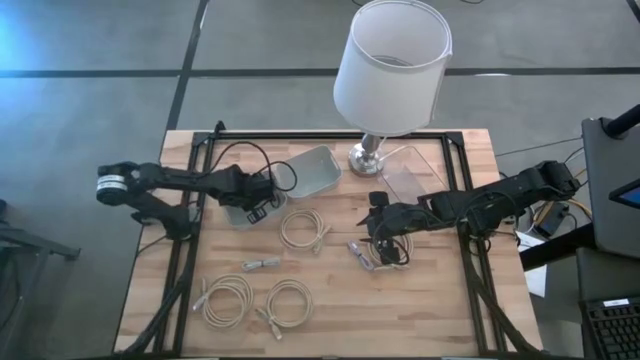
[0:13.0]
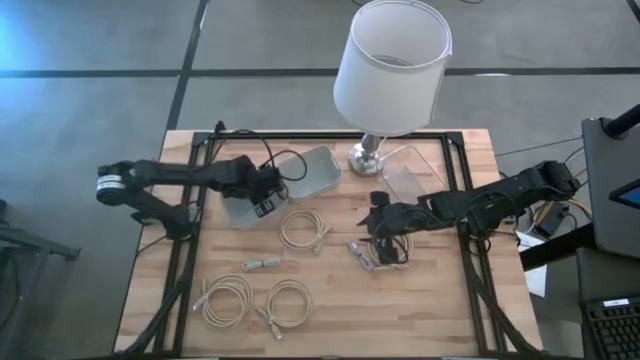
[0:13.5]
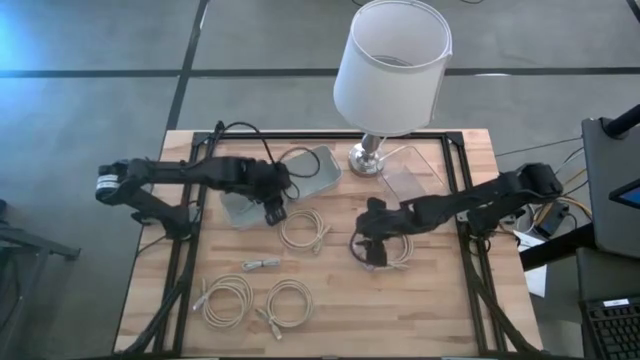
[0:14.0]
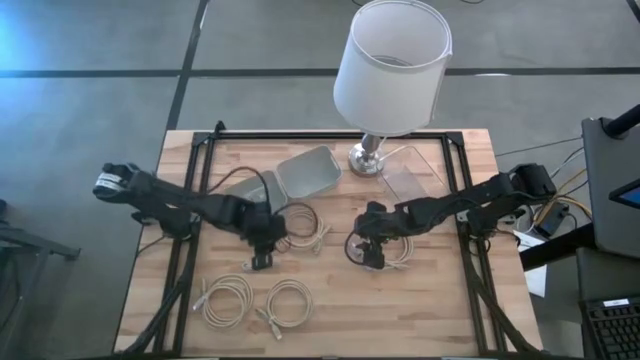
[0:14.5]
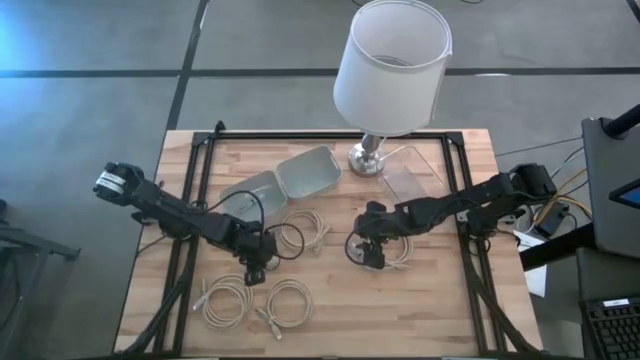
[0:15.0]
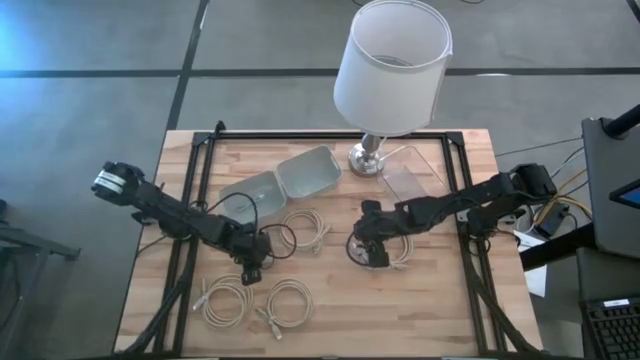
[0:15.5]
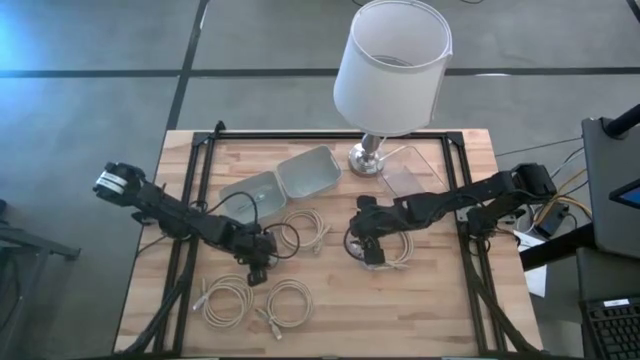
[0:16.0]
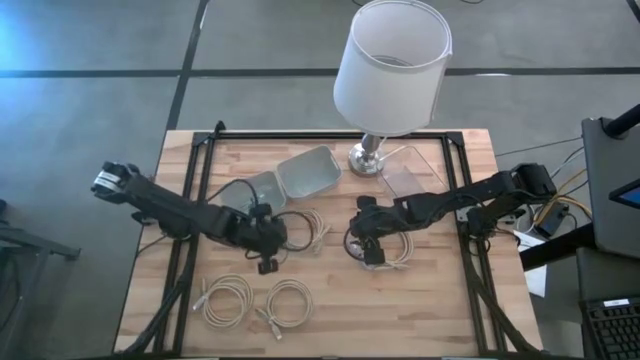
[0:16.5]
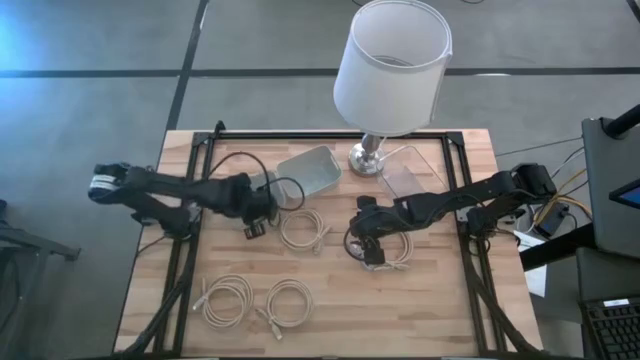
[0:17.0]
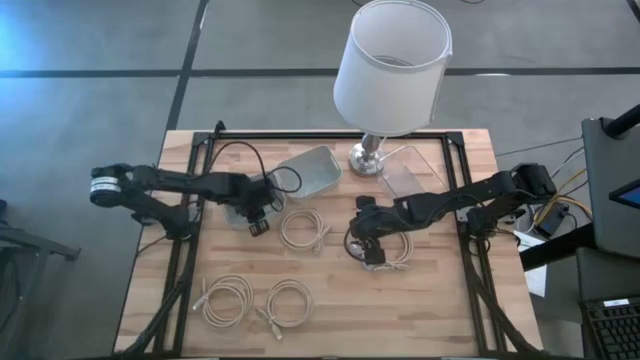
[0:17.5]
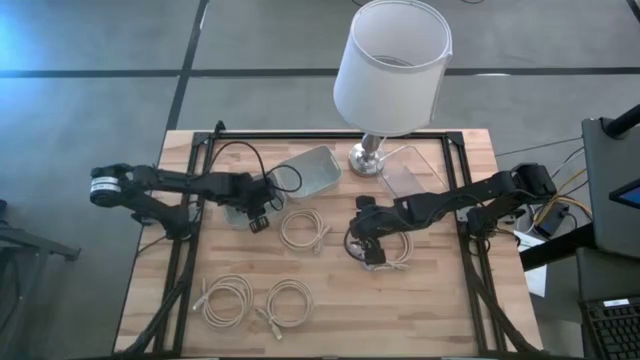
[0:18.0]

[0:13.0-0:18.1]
Task: Pick & Place USB Port
Put the white USB cable into the left white bin

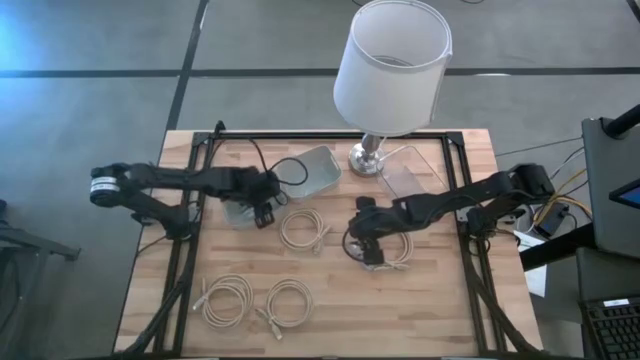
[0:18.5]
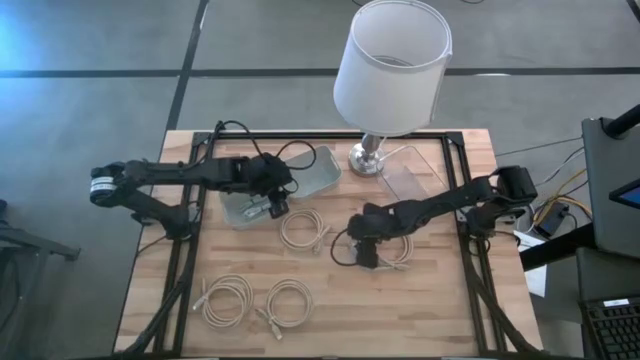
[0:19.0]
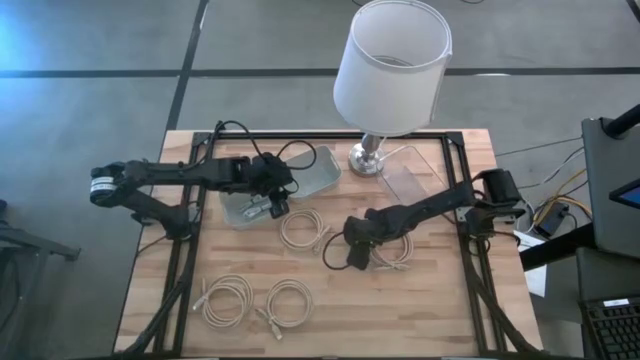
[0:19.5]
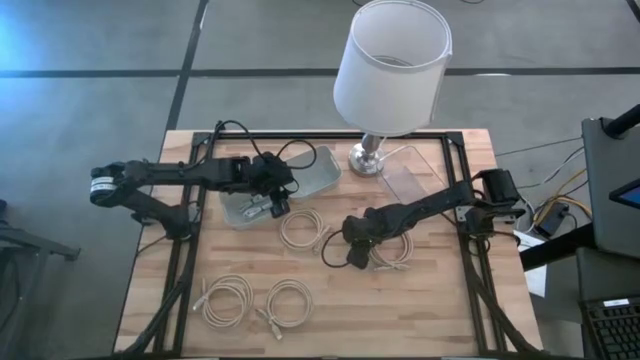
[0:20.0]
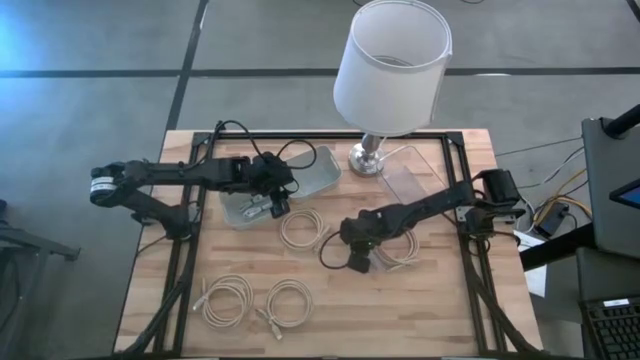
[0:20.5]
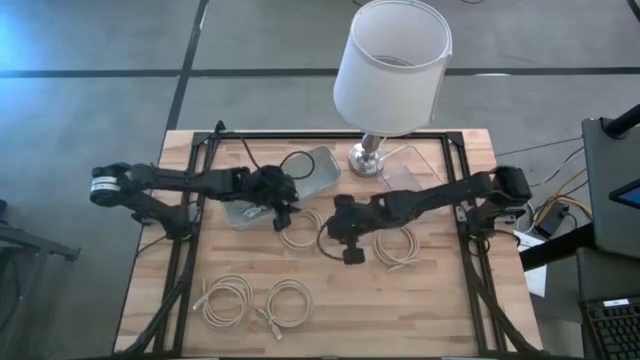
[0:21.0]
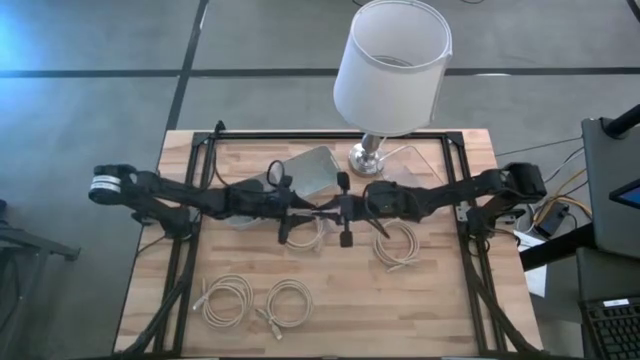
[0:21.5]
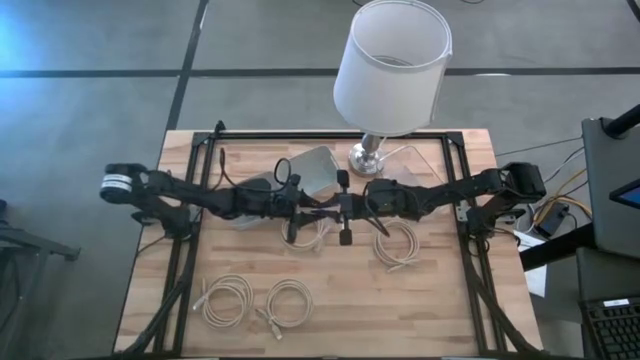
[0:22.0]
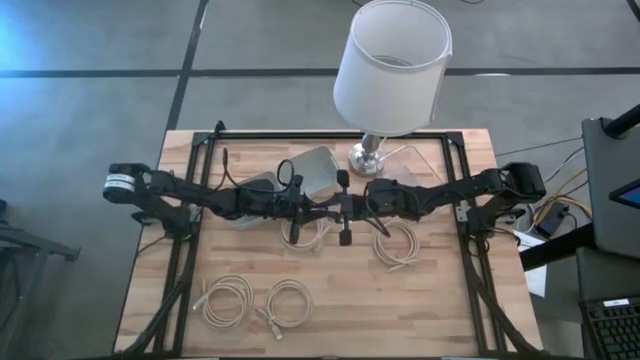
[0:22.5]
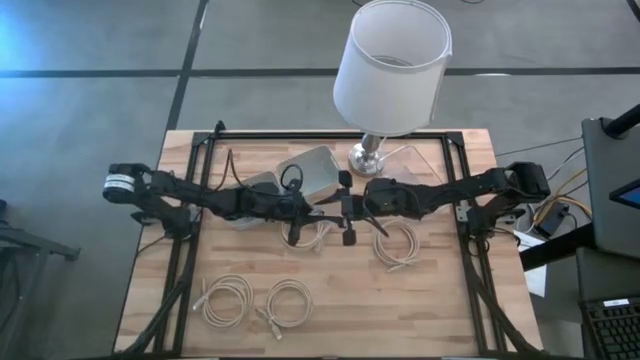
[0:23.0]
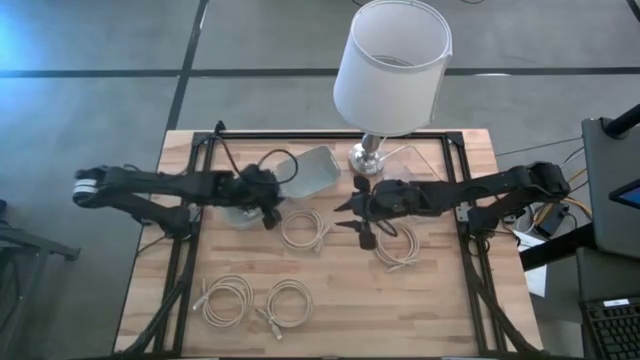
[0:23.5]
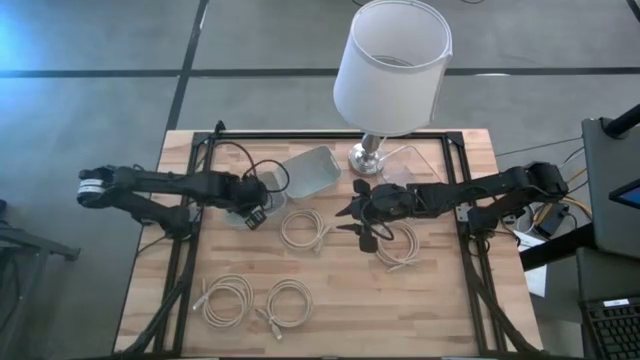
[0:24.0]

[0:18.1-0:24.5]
Put the purple USB cable into the left white bin

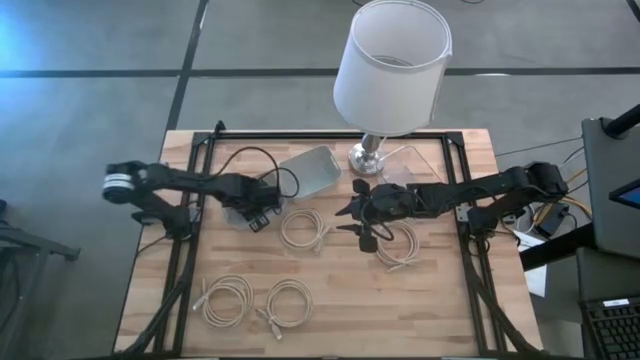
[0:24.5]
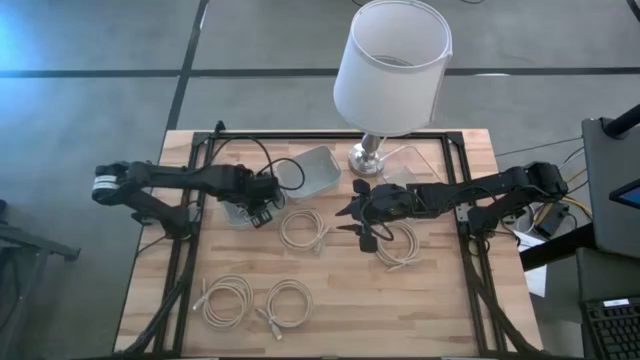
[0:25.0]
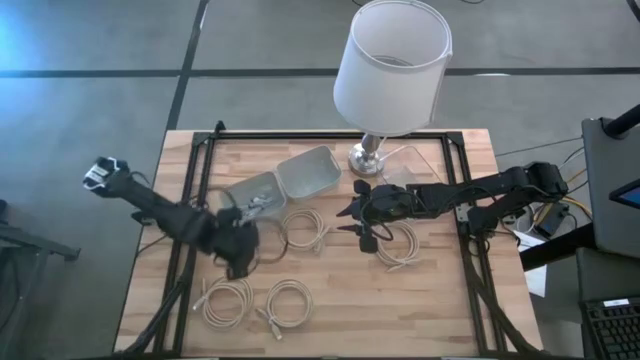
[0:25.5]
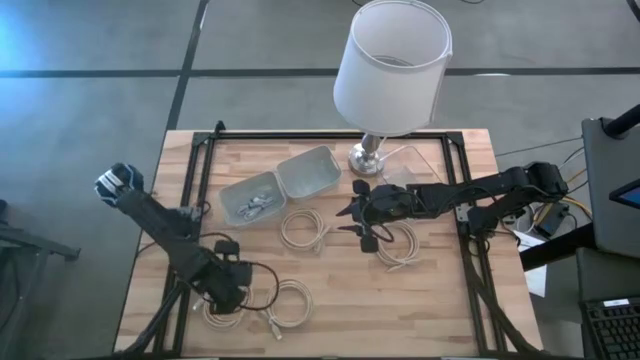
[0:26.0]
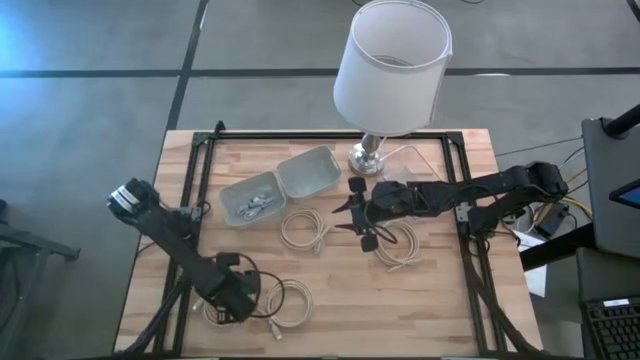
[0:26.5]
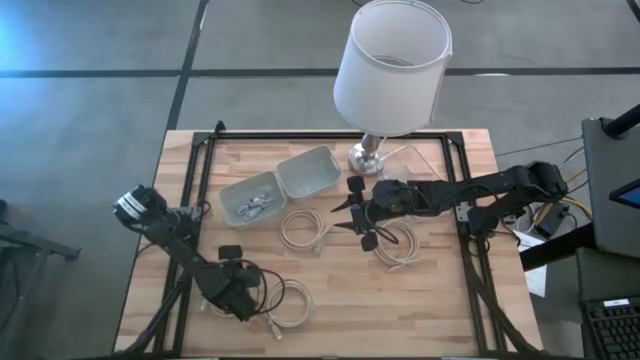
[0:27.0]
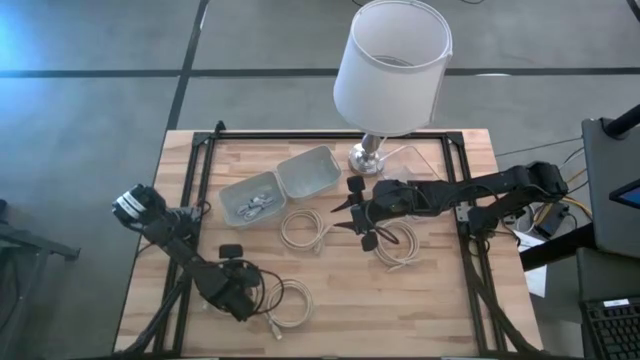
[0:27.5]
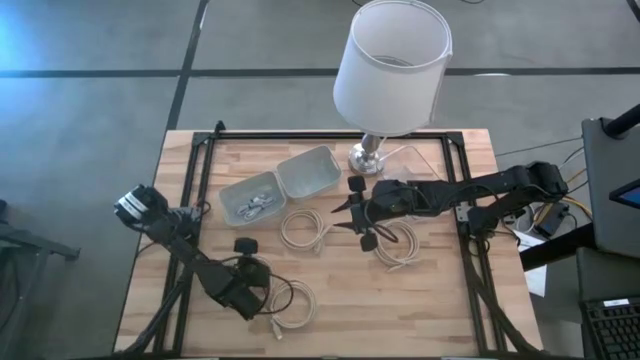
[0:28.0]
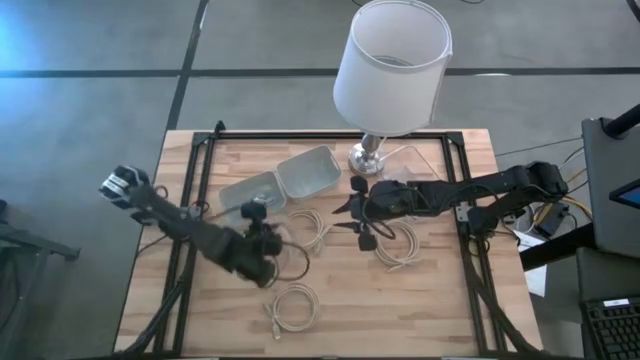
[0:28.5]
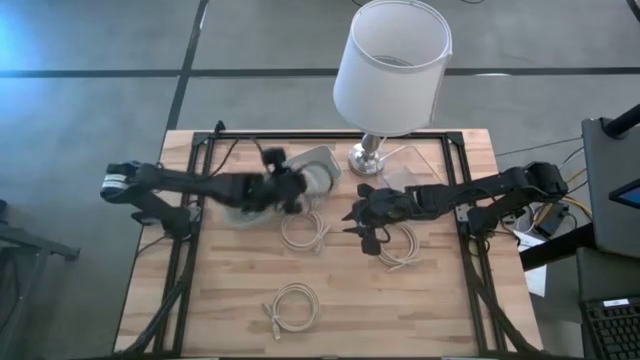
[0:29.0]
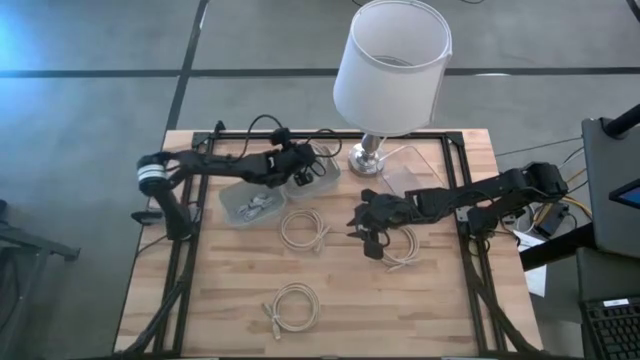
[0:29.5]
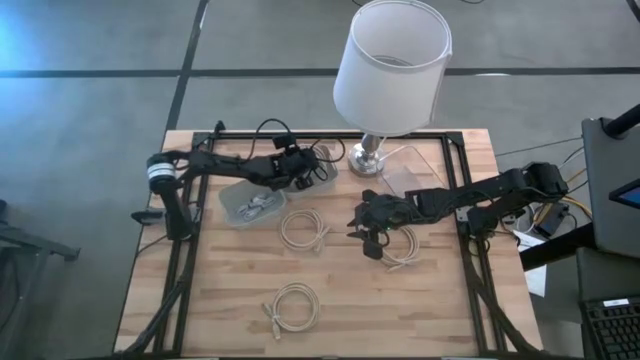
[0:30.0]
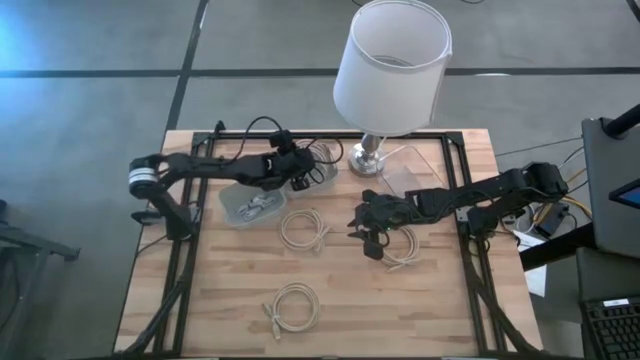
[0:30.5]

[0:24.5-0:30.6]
Put the light brown USB cable into the right white bin

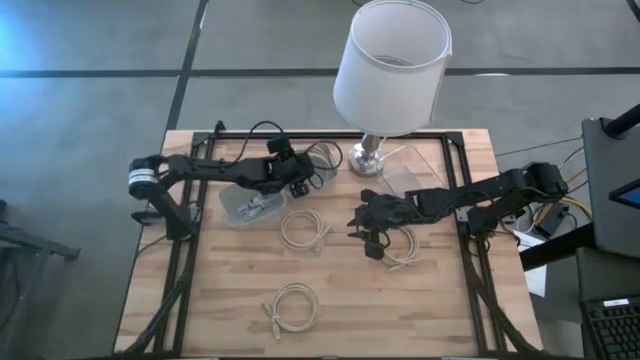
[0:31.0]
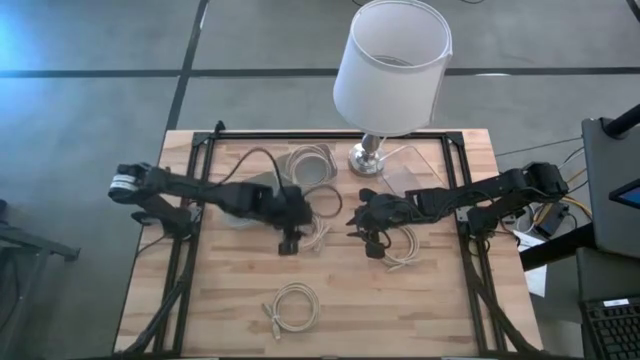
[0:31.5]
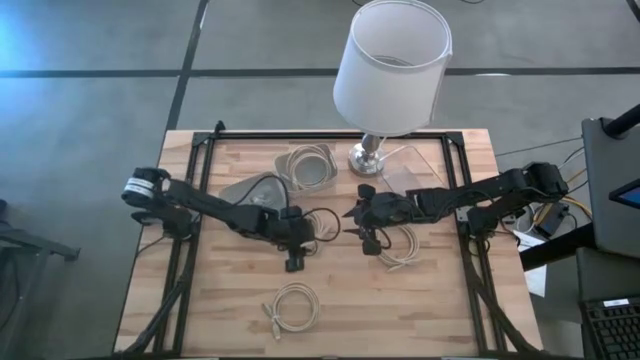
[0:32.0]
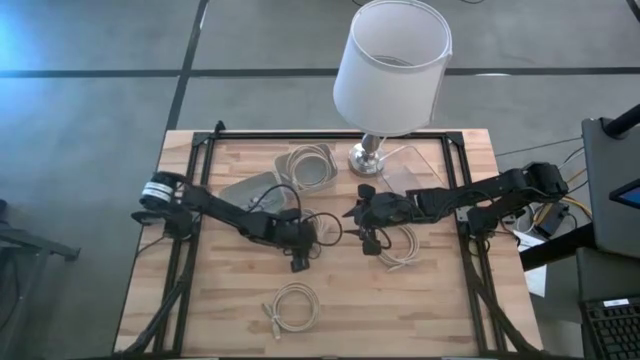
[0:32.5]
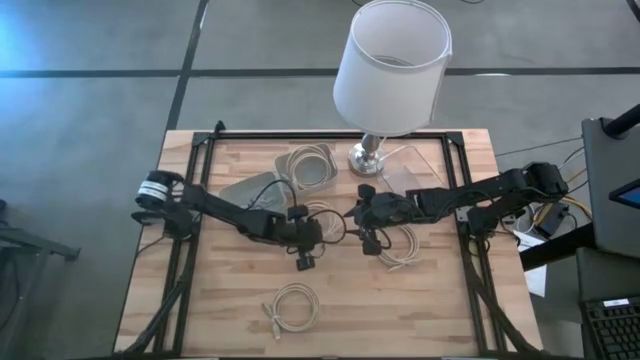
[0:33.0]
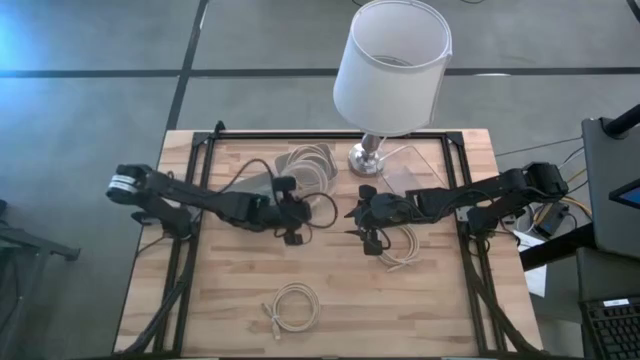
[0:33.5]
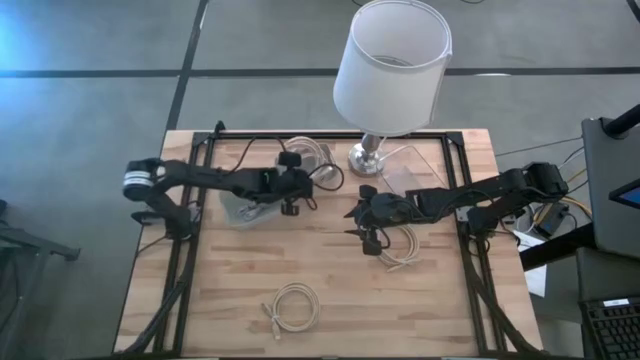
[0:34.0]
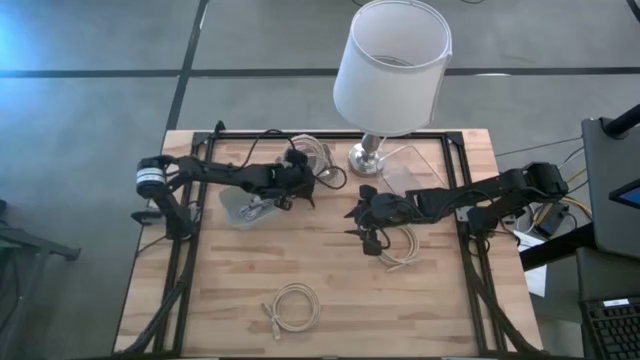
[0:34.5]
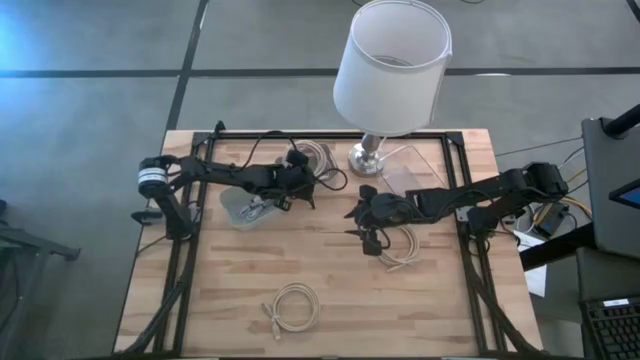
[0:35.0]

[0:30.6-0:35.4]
Put the light brown USB cable into the right white bin
